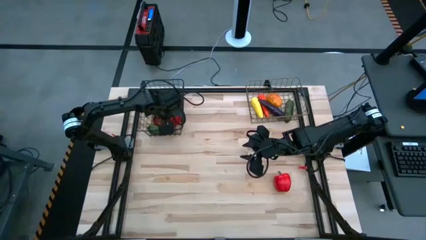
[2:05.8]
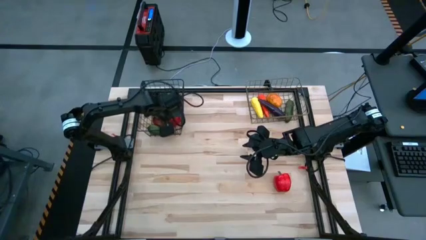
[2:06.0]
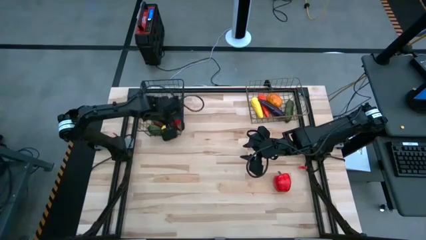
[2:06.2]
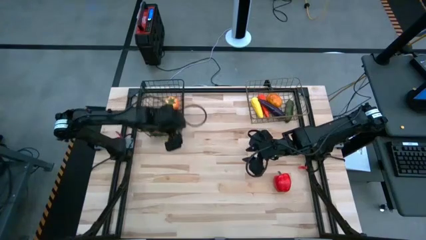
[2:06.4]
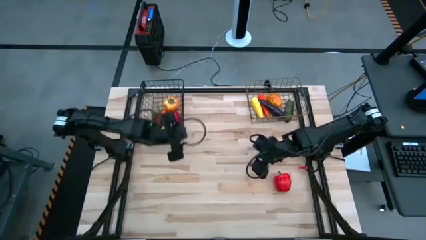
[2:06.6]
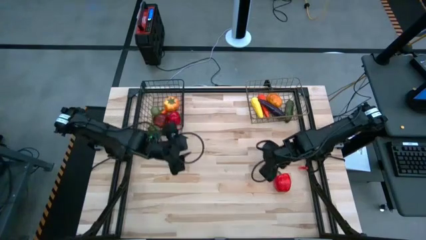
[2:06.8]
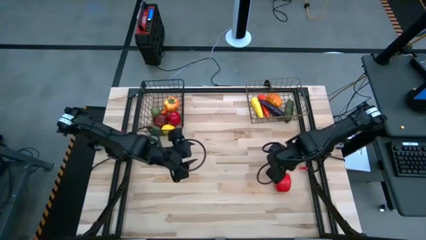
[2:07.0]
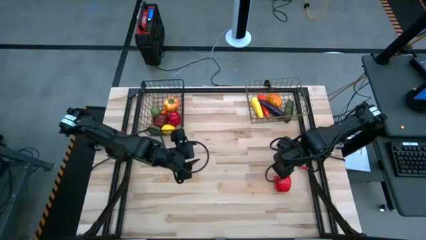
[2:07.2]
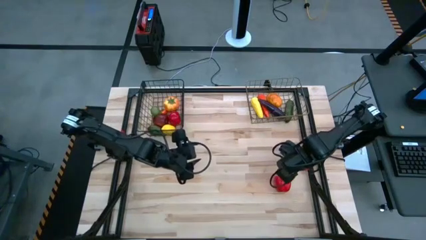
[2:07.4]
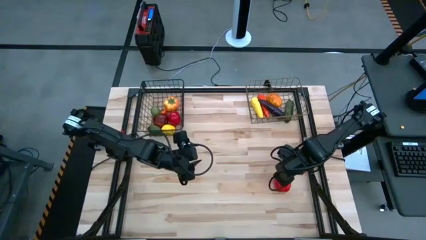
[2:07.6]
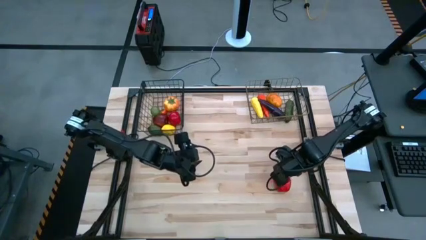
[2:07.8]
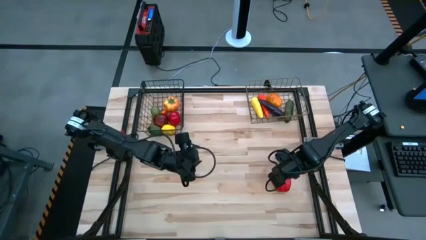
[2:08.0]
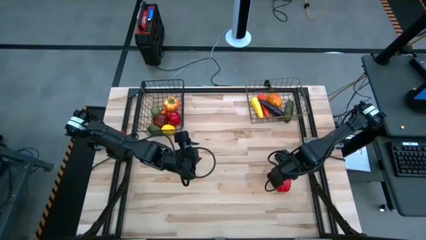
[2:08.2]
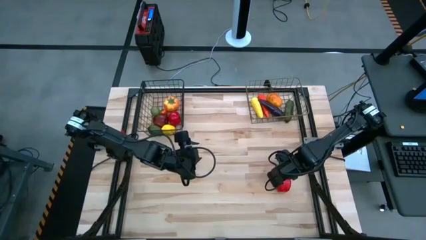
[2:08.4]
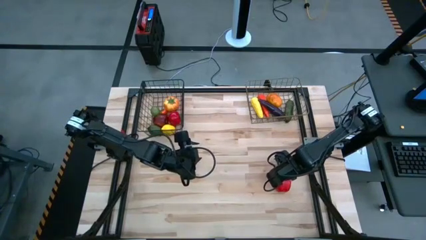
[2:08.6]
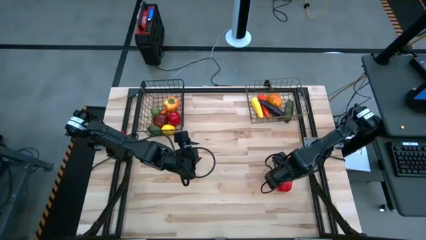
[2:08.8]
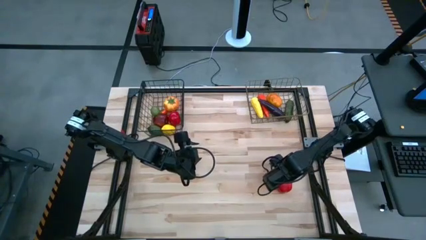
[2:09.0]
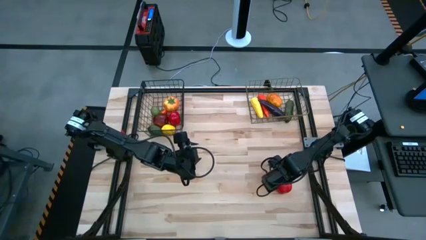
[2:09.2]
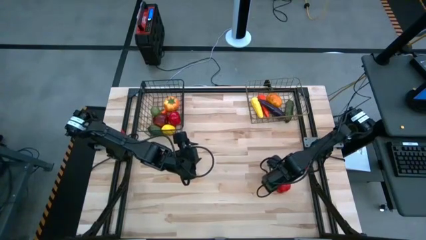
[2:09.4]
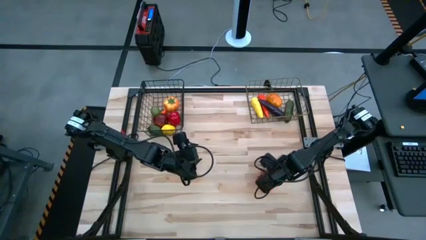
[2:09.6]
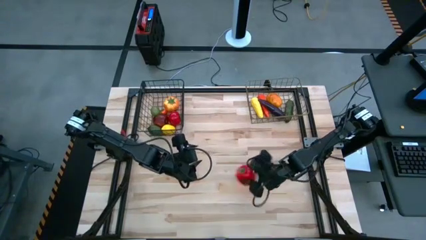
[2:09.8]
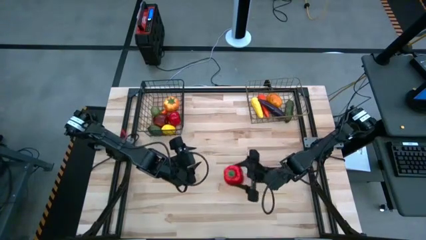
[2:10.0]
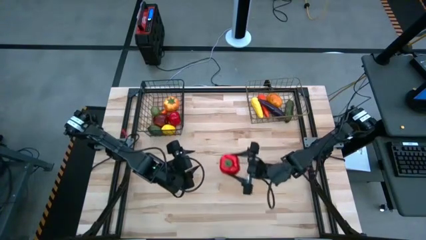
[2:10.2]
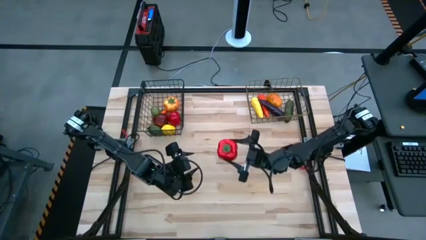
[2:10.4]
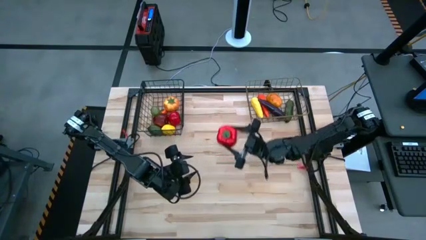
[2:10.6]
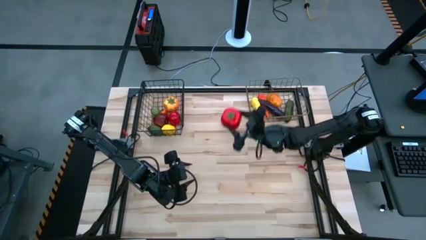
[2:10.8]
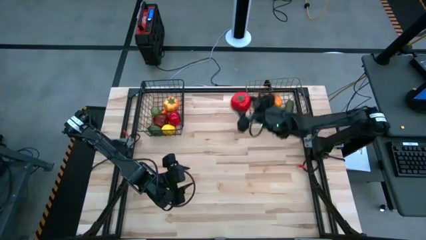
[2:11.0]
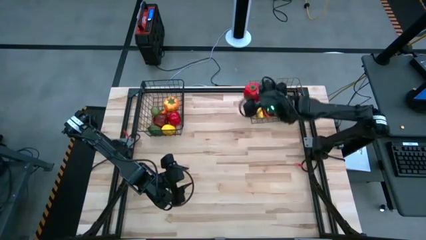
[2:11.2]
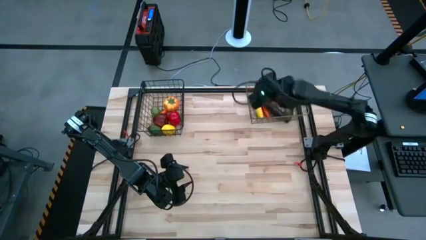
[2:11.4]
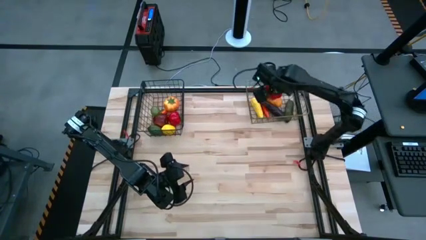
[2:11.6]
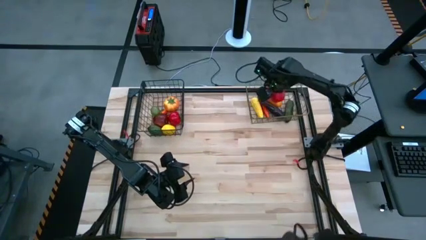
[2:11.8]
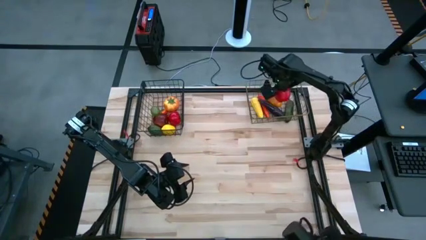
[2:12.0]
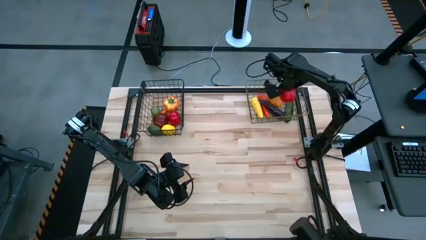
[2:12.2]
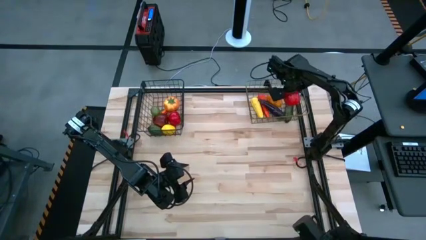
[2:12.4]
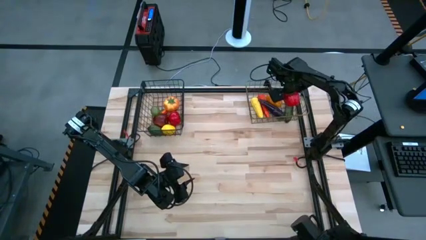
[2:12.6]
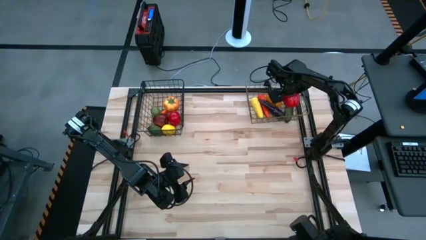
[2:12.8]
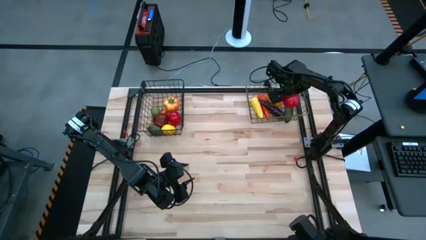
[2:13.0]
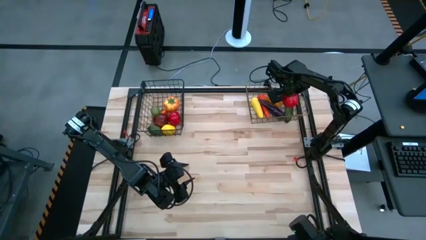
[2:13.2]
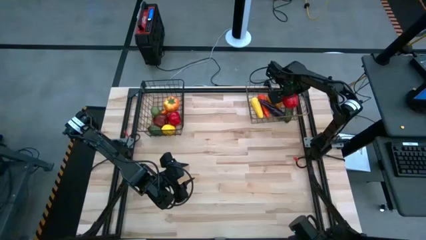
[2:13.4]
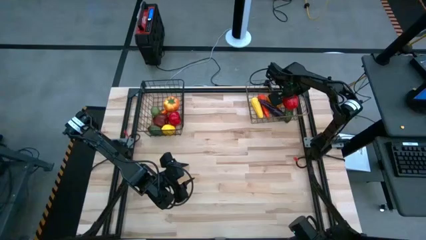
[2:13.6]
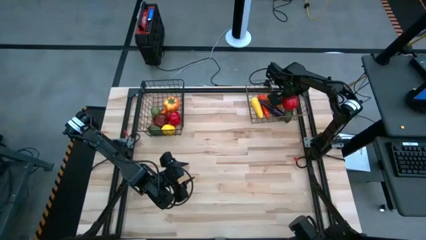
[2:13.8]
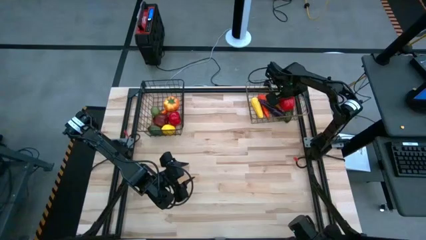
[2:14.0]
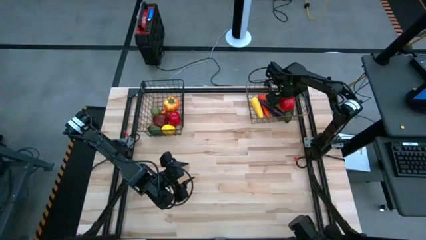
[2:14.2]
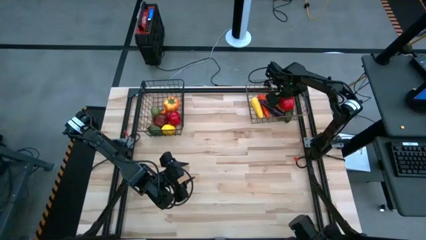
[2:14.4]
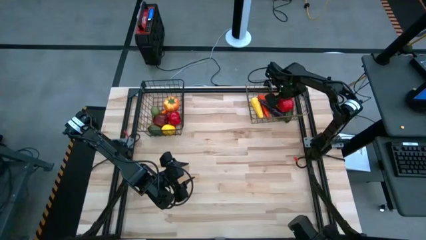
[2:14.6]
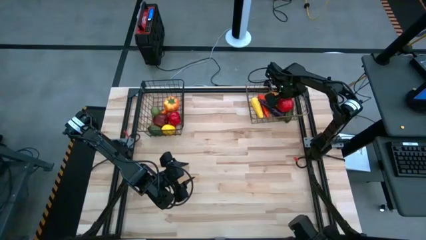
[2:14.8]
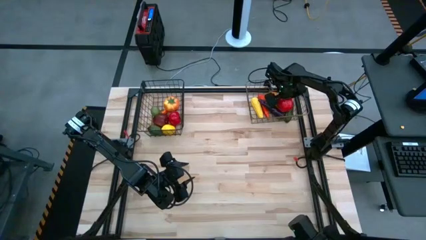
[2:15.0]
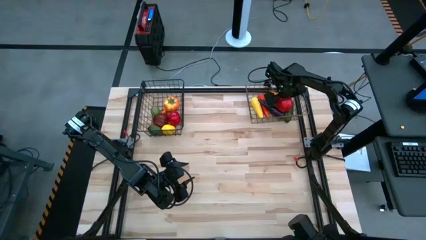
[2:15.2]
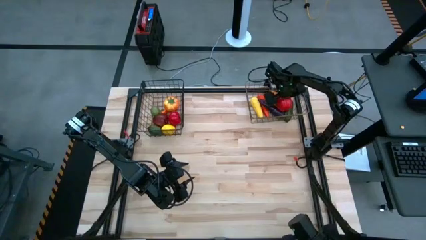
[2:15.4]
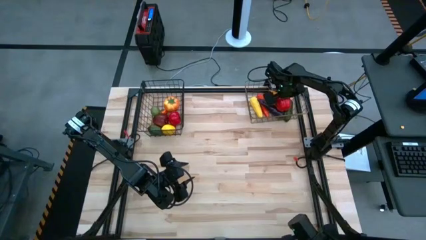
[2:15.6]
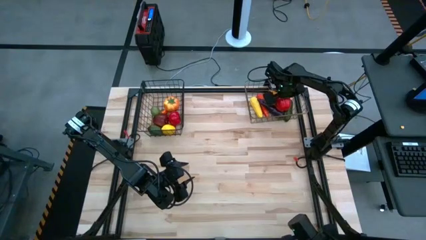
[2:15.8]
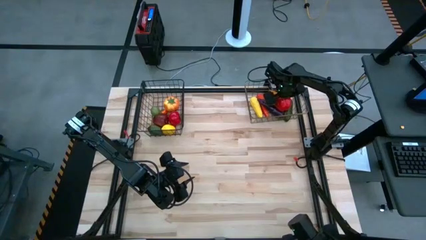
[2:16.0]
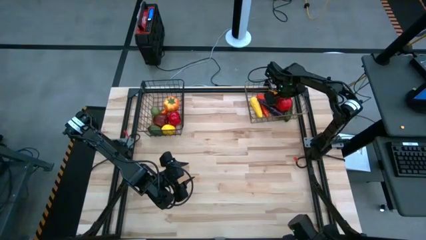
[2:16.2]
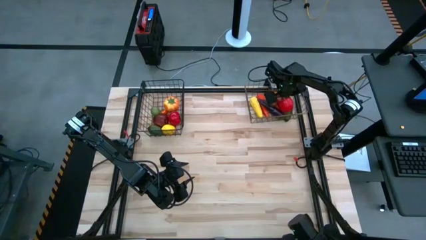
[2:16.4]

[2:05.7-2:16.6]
Task: Sort produce into baskets
Put the red bell pepper into the right wire basket

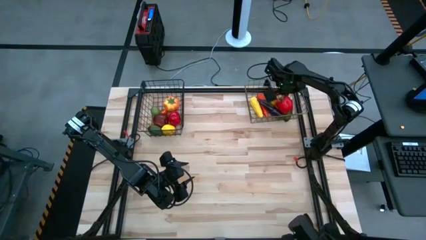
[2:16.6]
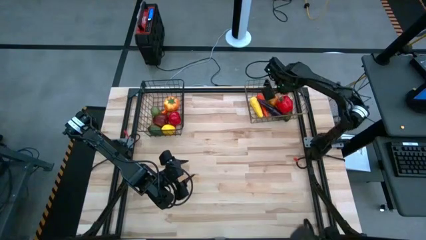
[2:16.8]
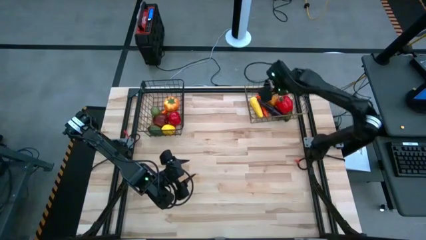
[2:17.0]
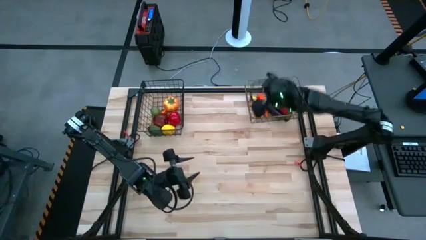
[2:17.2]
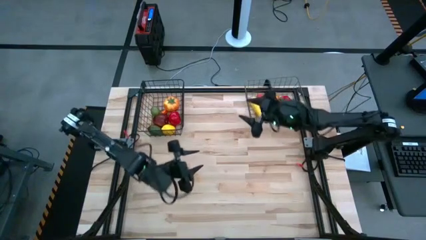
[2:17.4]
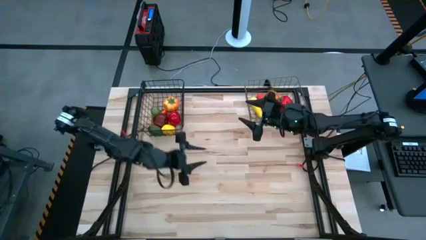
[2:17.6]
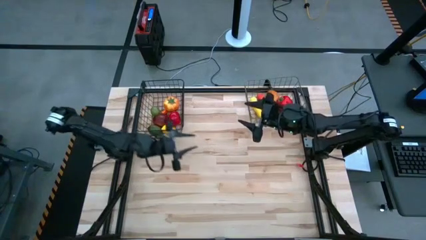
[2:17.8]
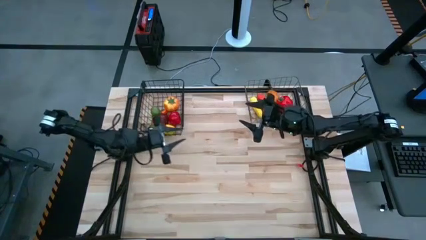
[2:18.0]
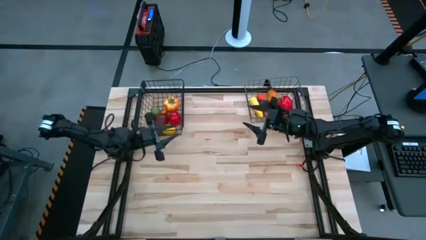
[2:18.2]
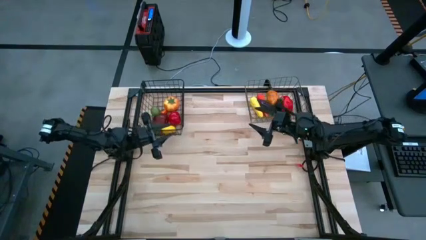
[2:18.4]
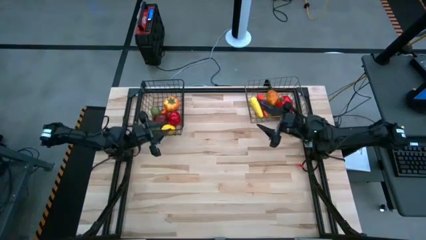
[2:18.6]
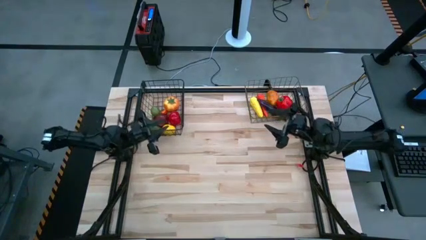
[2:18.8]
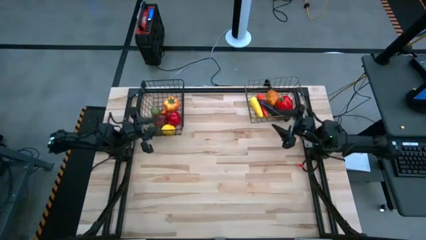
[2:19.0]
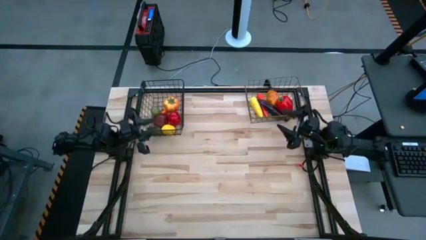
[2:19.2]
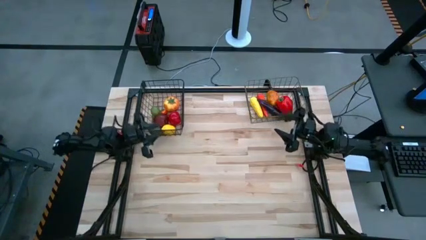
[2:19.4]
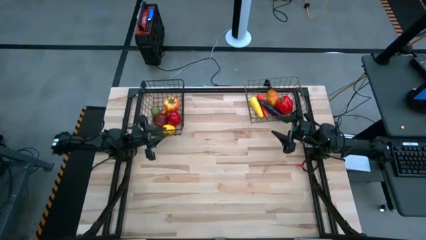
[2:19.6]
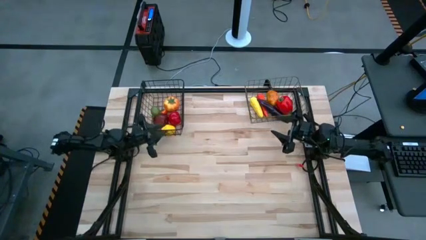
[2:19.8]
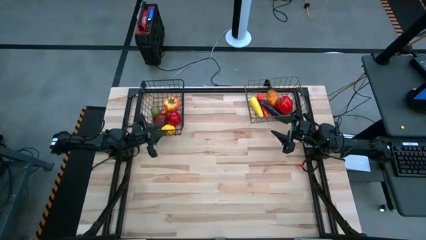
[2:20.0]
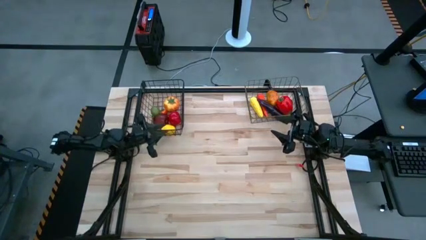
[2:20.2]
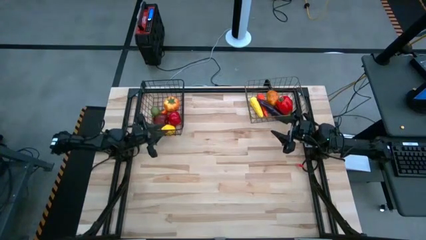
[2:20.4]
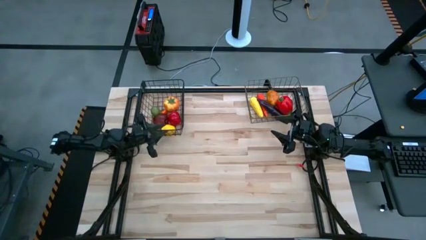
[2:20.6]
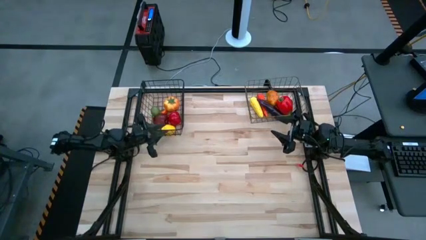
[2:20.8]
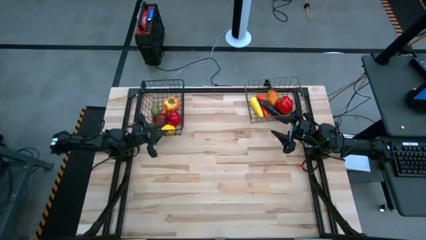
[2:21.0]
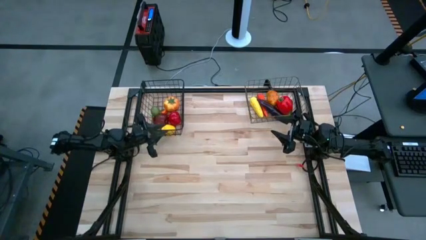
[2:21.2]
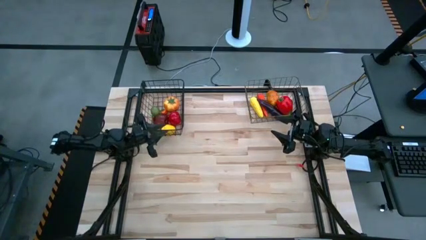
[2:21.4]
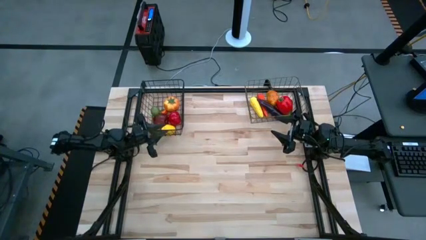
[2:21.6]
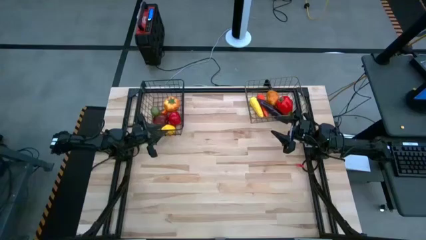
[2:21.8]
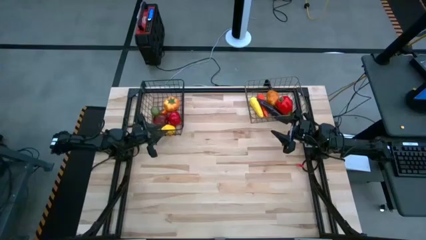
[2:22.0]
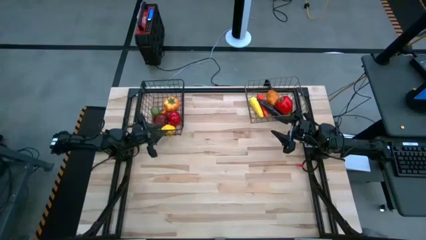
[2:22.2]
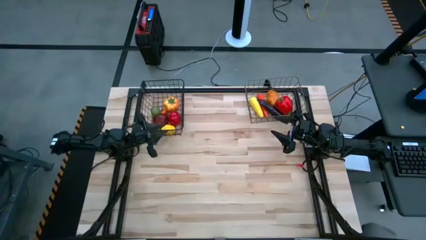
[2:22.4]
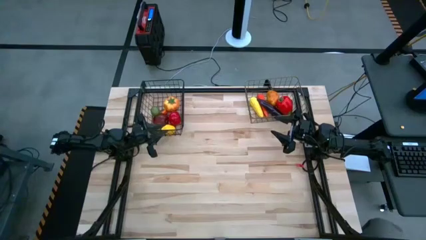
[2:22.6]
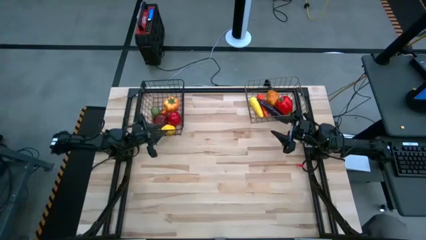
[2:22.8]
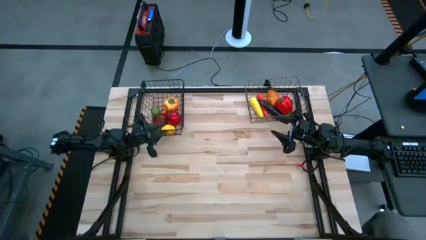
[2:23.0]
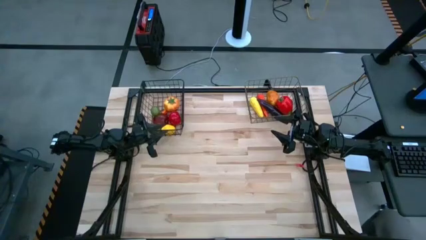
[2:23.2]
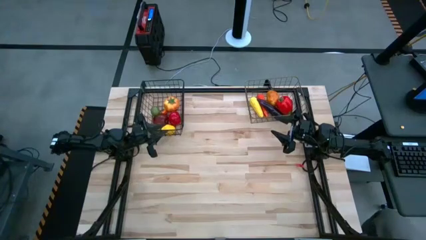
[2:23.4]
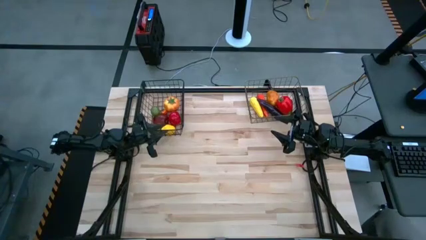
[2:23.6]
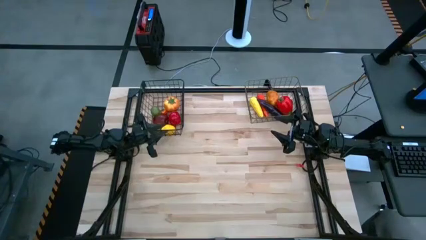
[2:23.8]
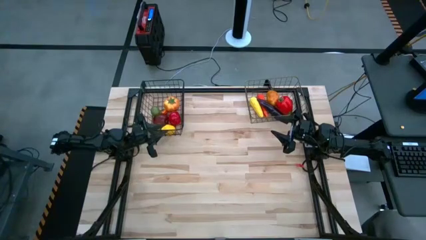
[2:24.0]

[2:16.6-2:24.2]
Return to Home Position
